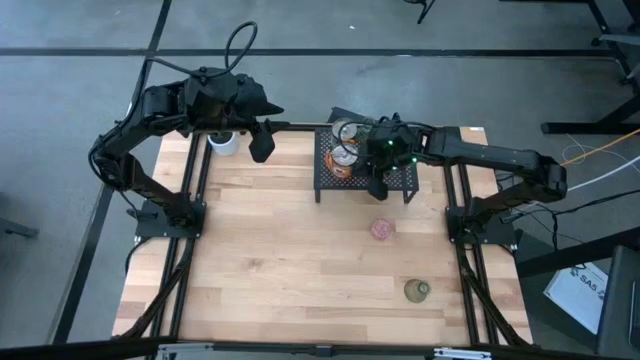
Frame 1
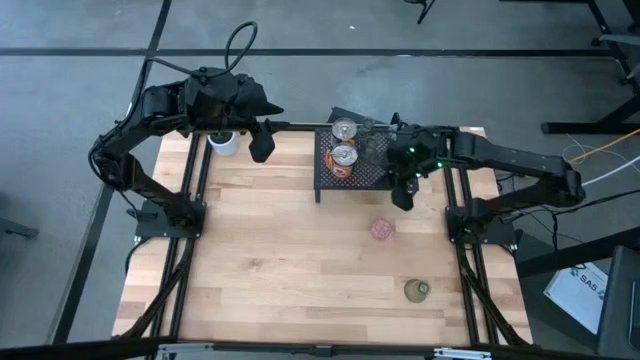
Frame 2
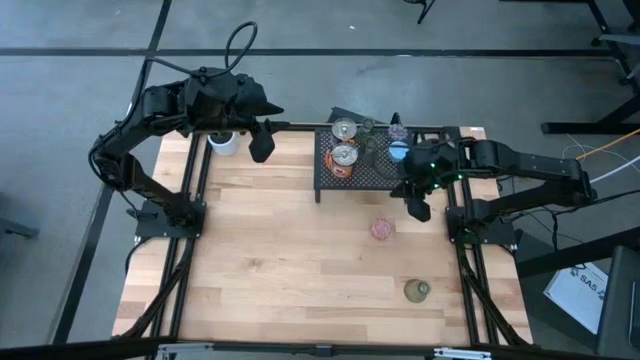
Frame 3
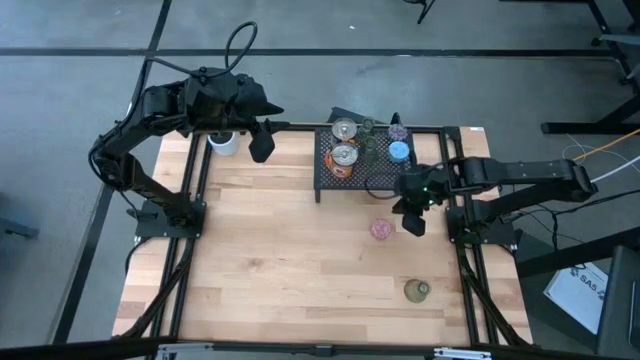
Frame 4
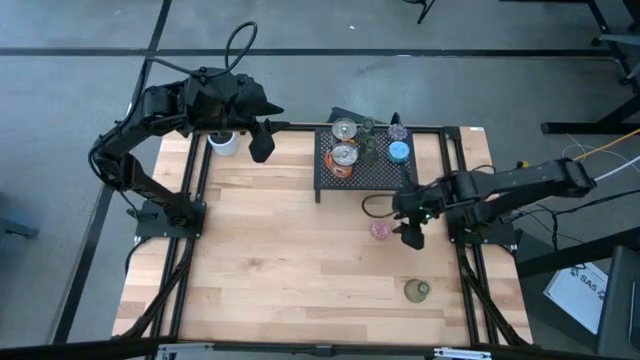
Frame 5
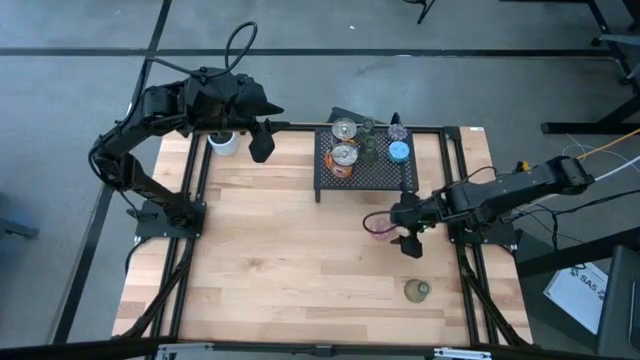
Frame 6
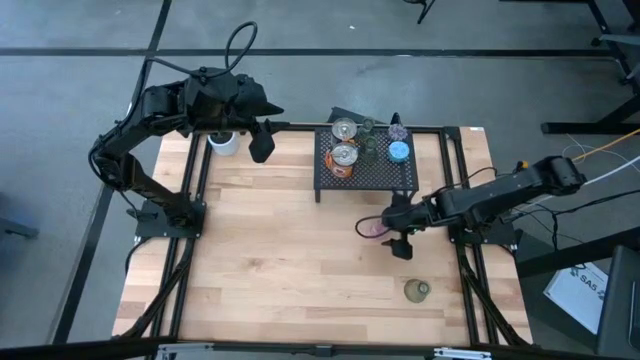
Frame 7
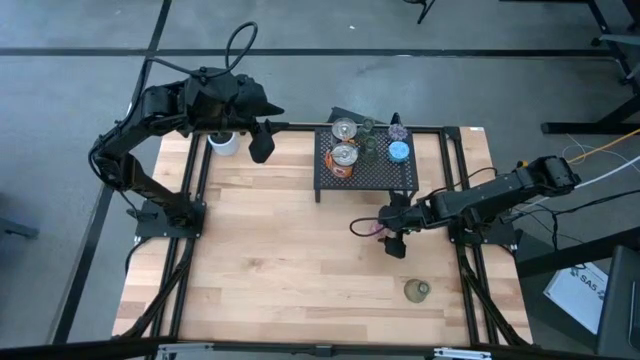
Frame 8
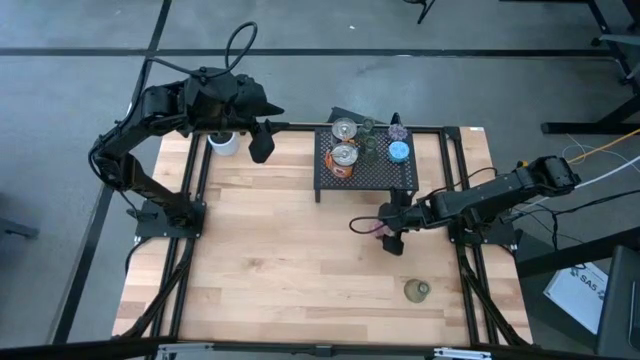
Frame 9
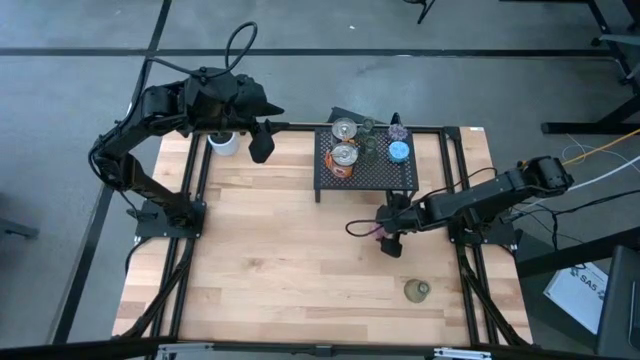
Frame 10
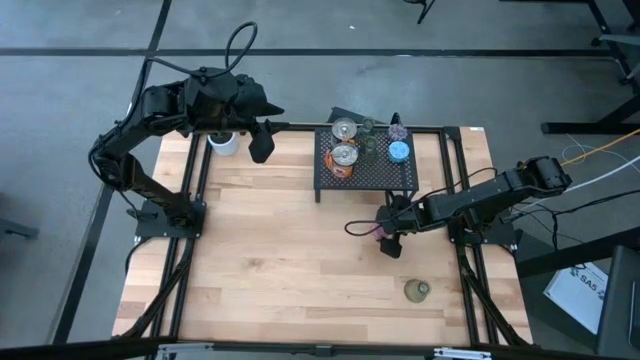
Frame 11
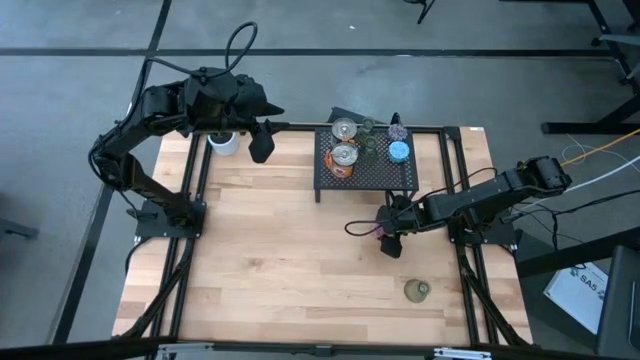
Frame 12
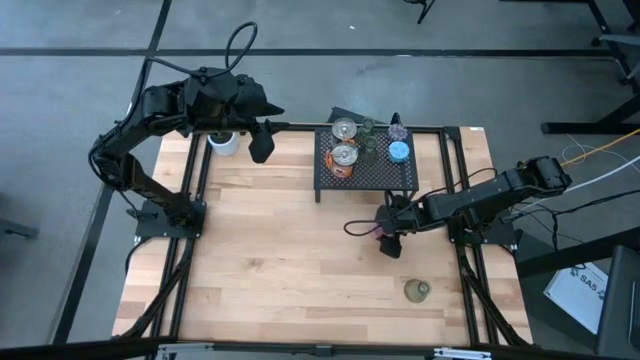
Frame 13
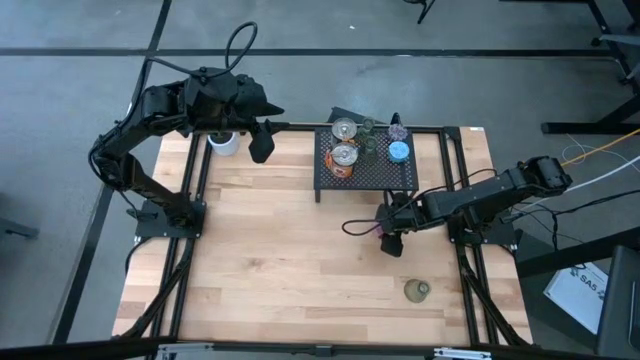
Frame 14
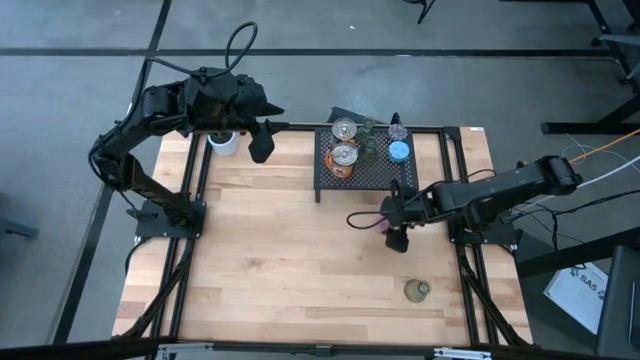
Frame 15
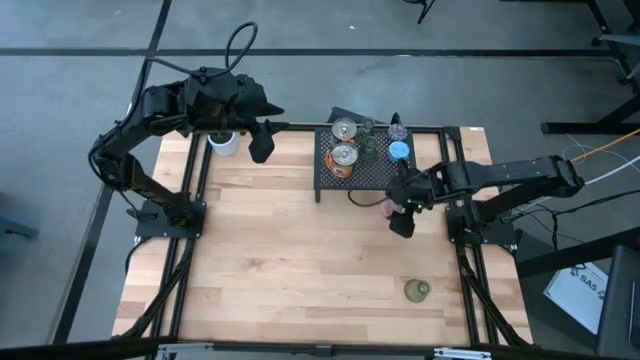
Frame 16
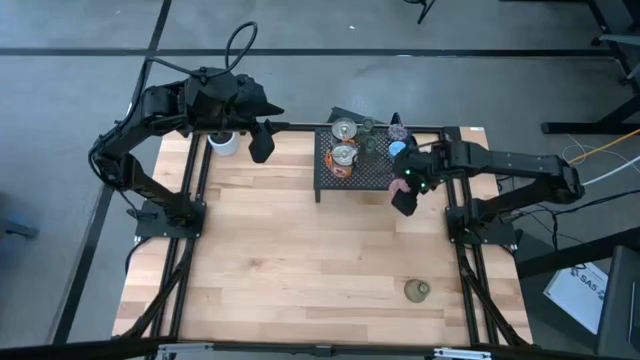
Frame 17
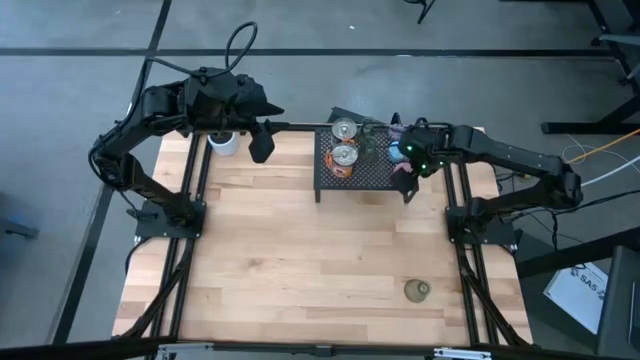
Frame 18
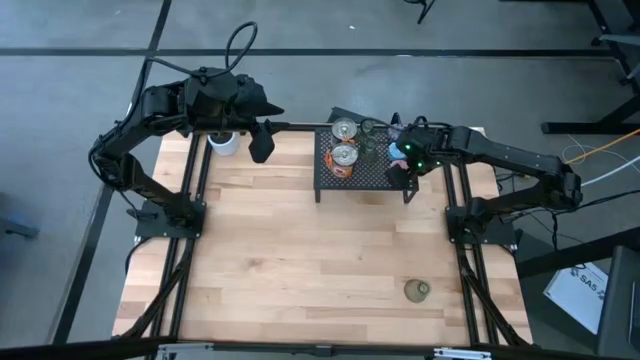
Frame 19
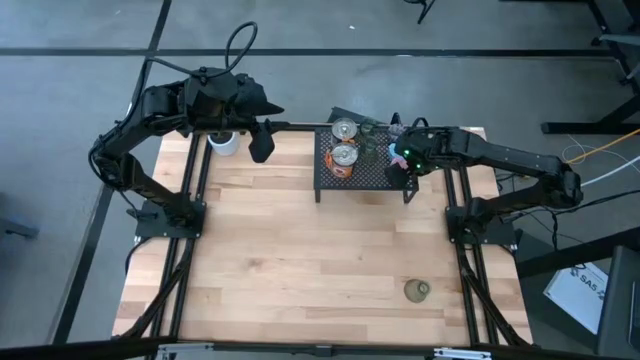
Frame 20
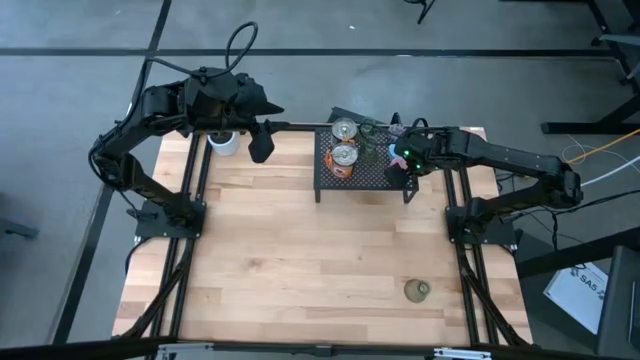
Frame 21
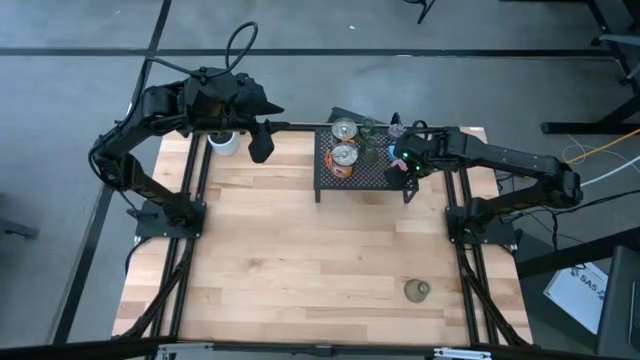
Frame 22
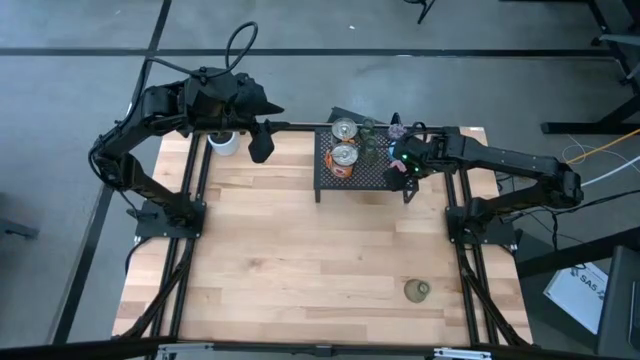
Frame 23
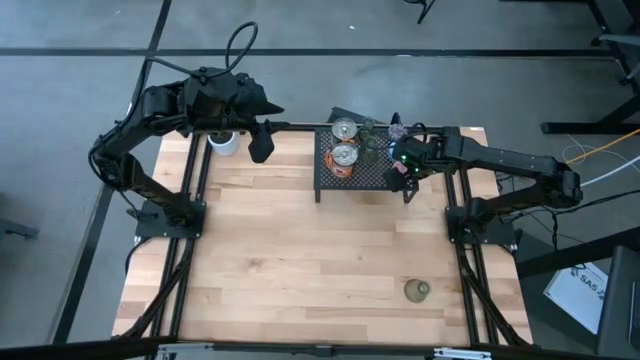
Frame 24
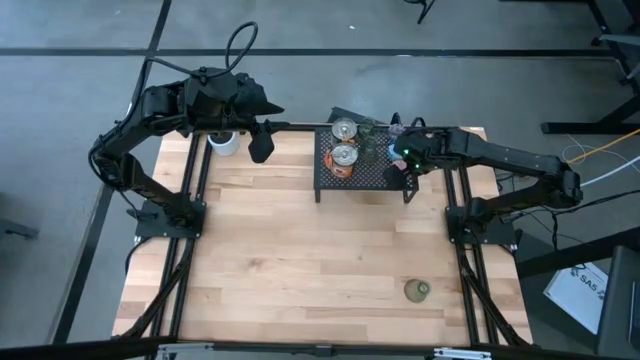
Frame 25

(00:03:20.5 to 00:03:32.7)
Task: Pick & Place candle stick holders
Put the pink scented candle on the shelf aligned with the blue scented candle

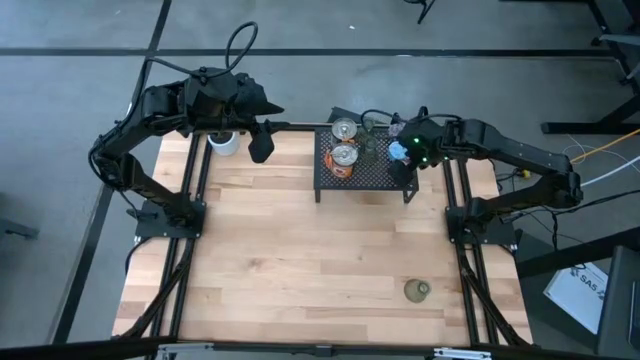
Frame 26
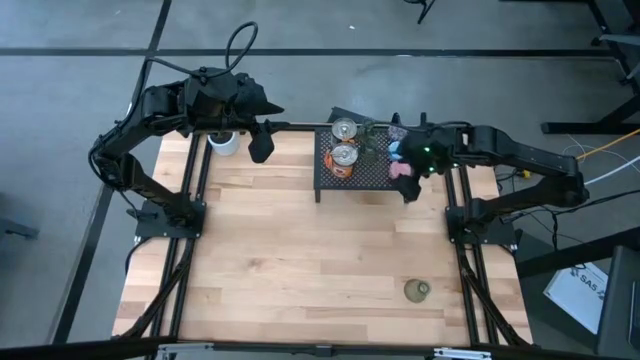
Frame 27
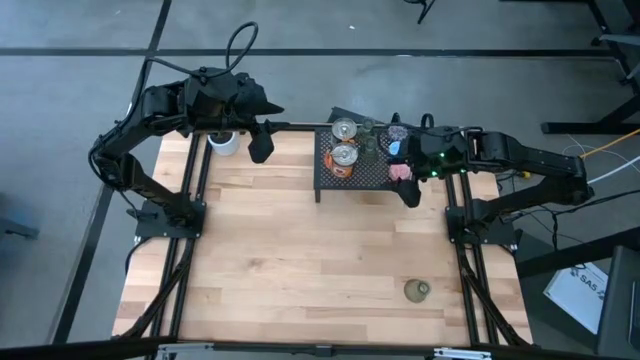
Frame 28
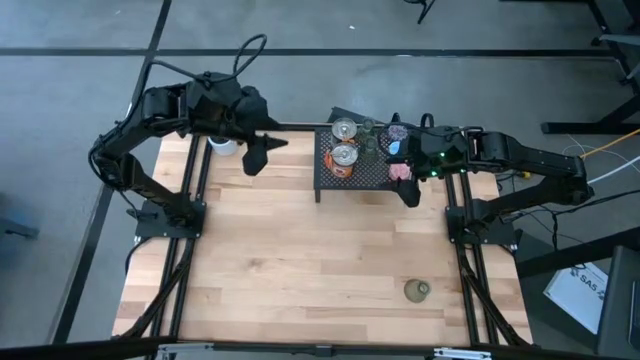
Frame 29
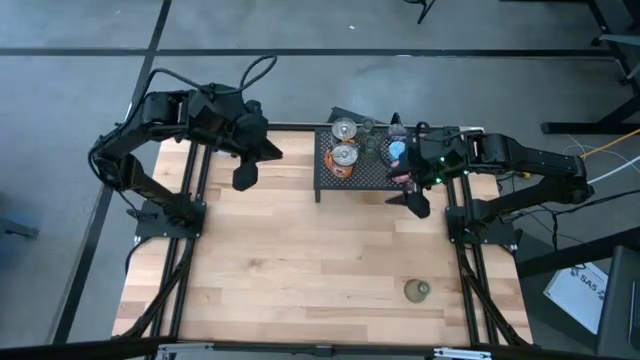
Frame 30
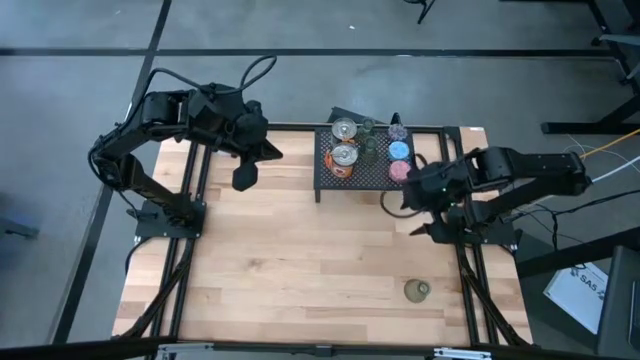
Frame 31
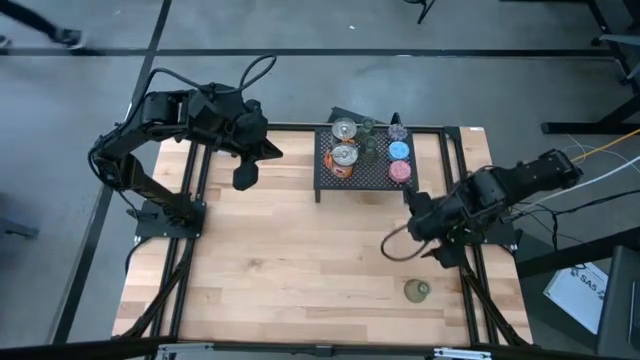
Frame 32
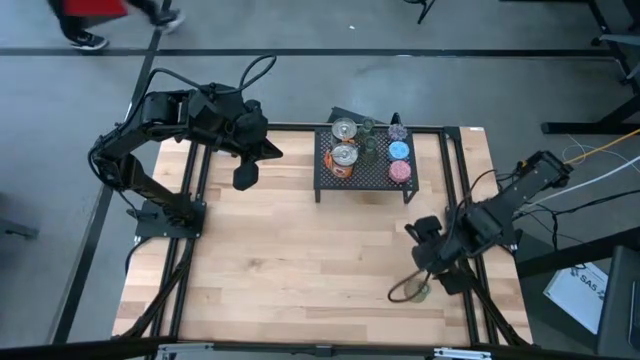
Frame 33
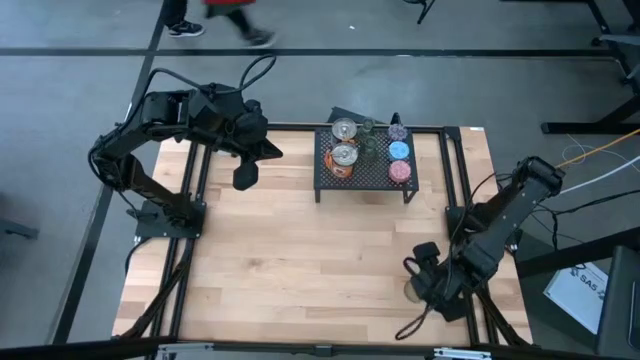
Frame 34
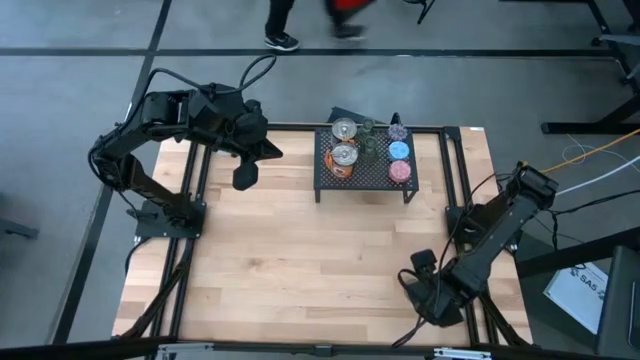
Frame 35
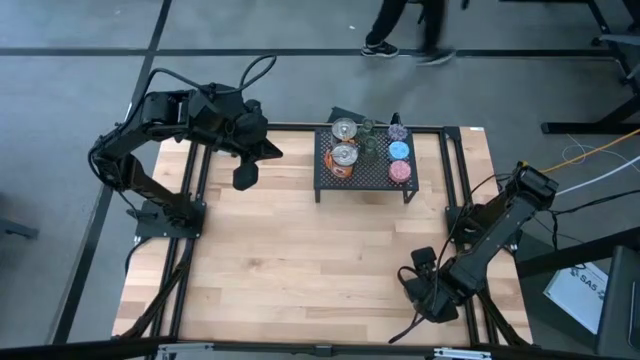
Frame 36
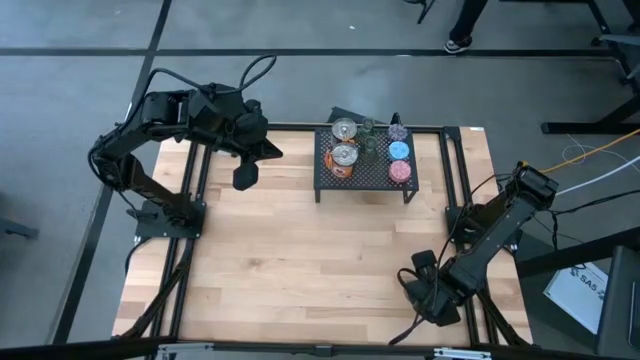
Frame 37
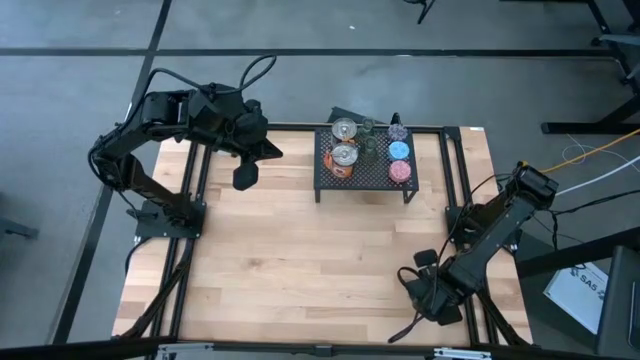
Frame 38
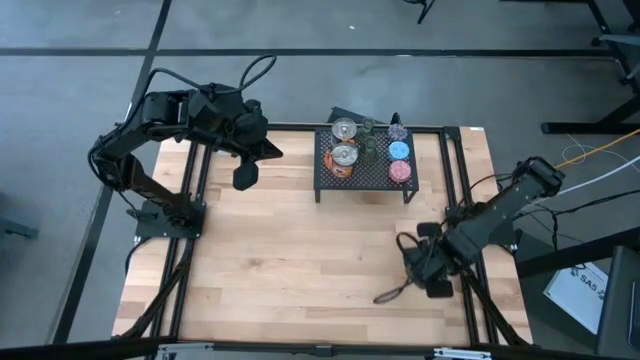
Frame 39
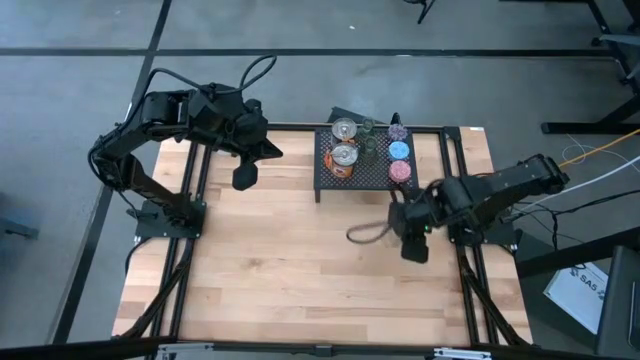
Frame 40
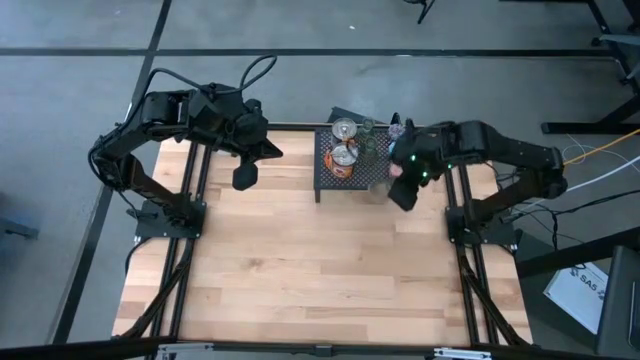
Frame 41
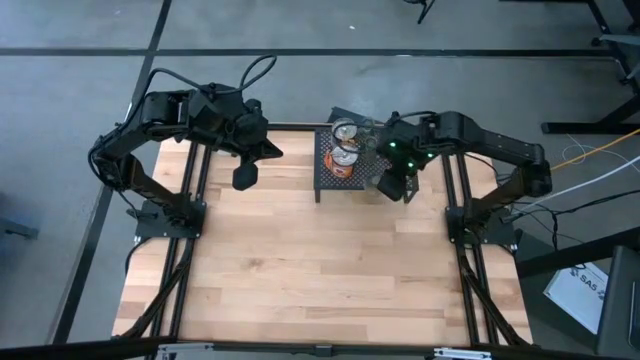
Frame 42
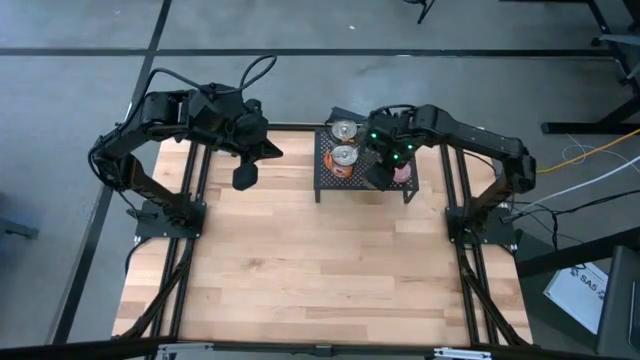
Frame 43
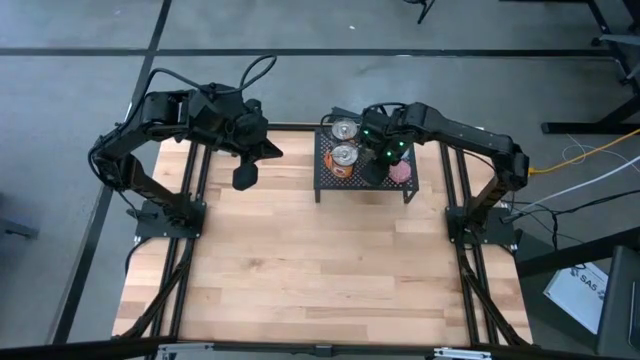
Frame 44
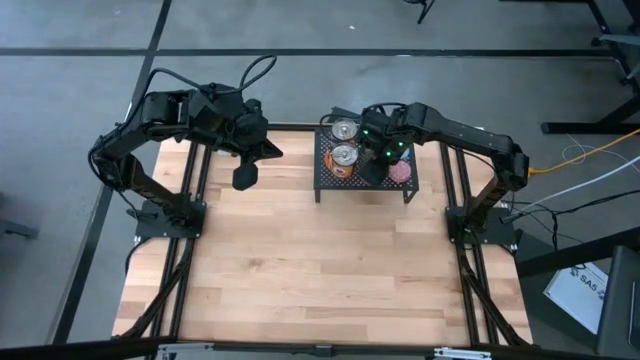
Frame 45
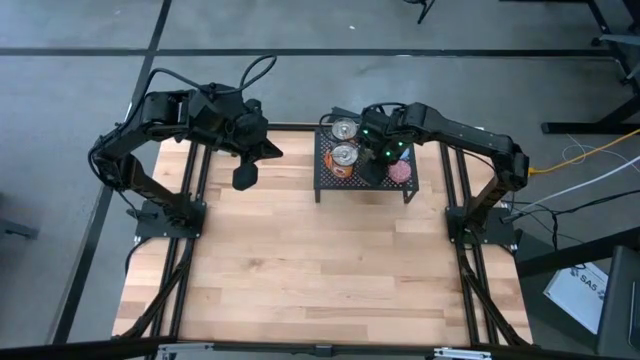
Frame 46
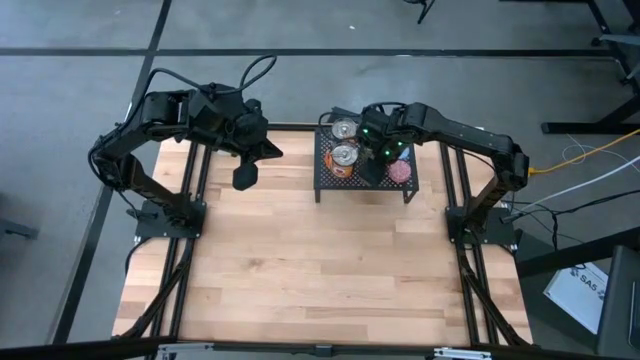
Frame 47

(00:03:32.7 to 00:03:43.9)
Put the green vase candle holder on the shelf aligned with the other green vase candle holders
